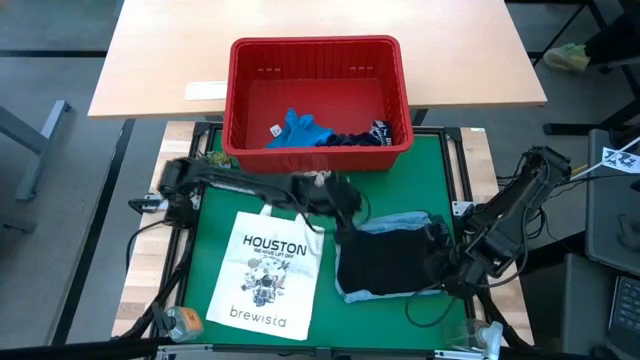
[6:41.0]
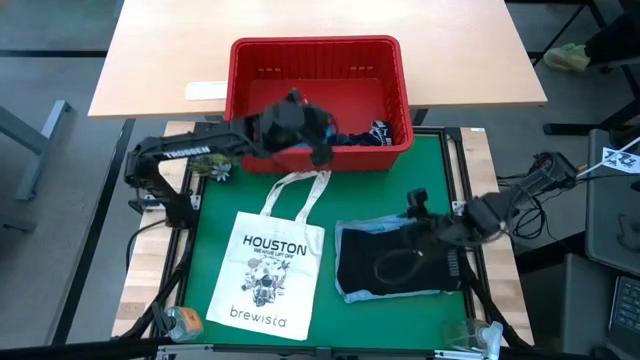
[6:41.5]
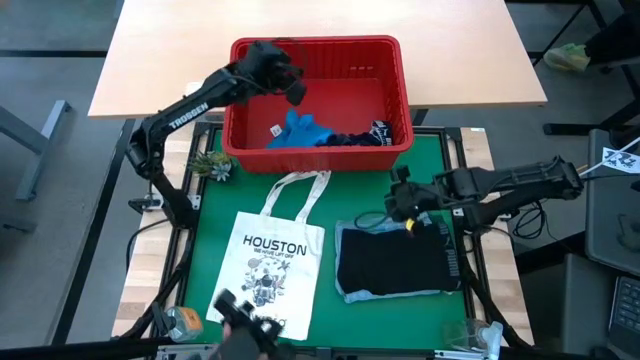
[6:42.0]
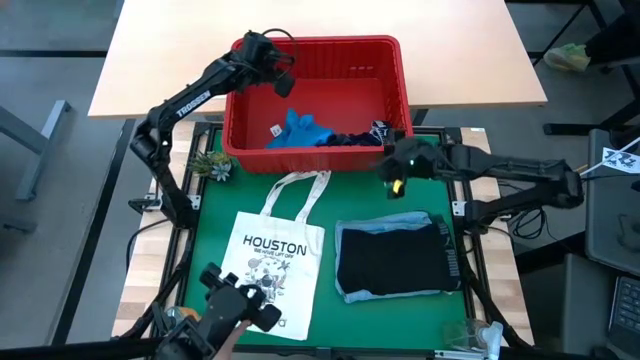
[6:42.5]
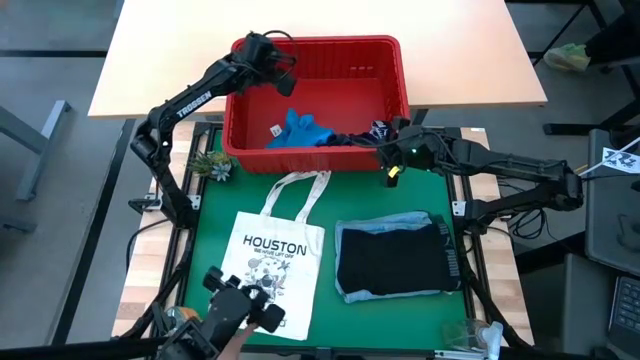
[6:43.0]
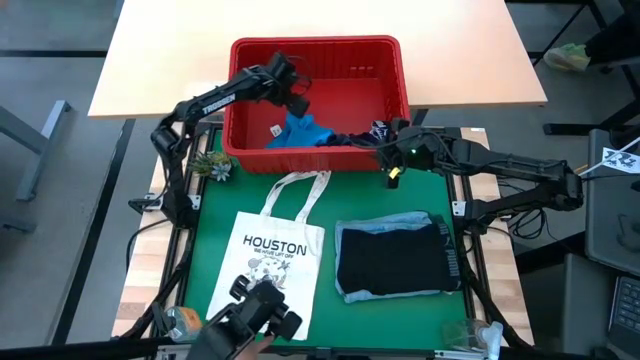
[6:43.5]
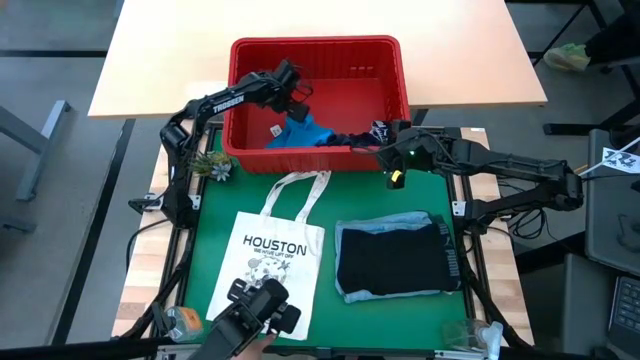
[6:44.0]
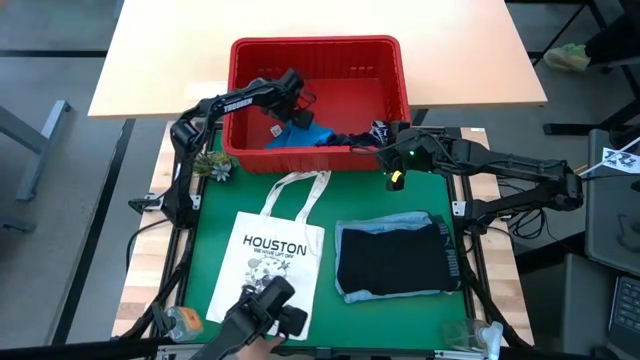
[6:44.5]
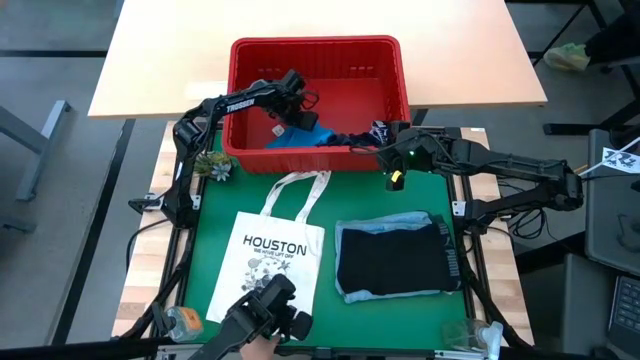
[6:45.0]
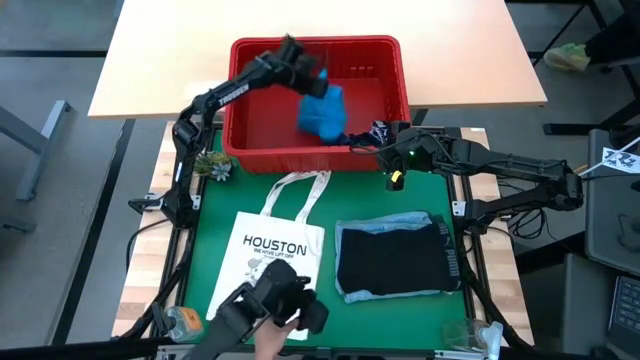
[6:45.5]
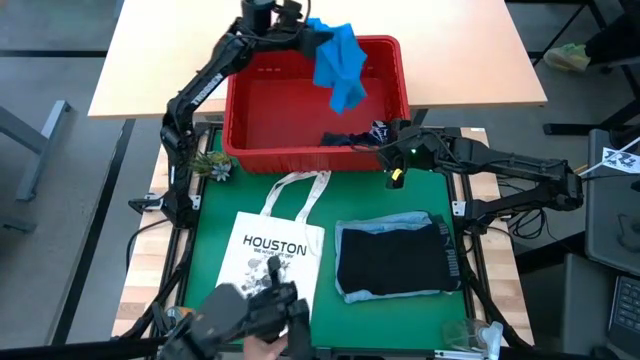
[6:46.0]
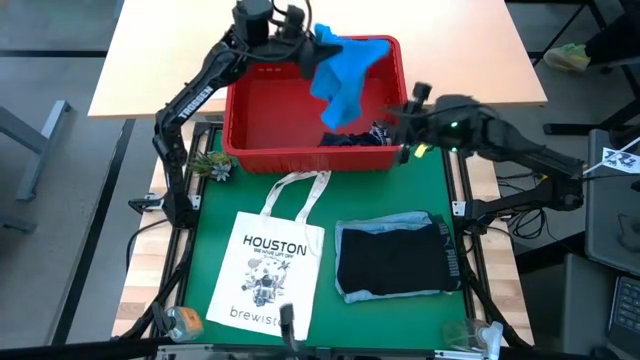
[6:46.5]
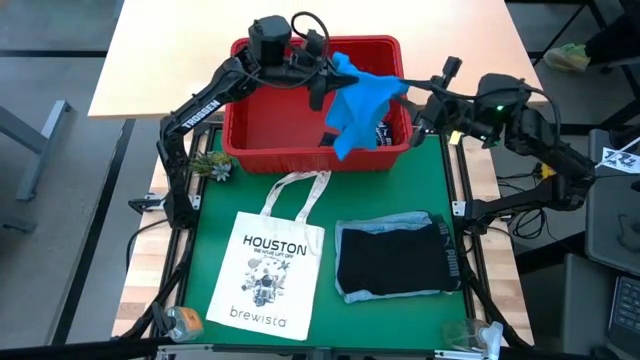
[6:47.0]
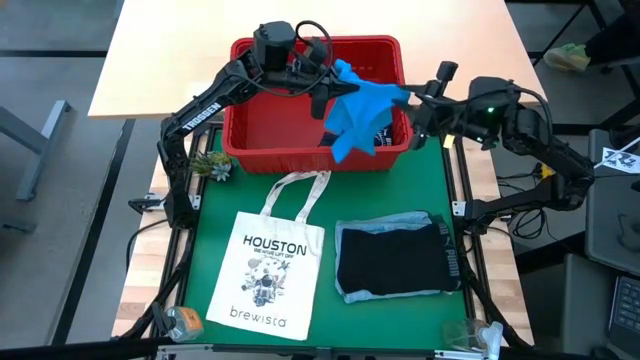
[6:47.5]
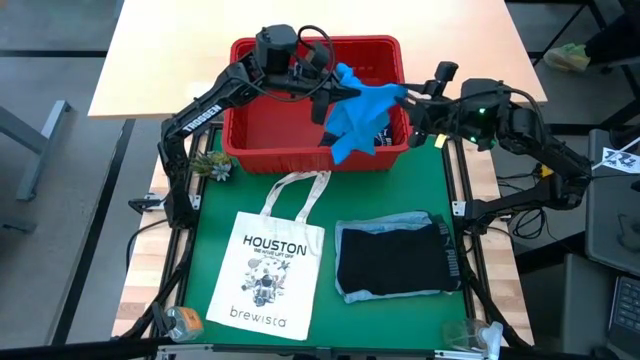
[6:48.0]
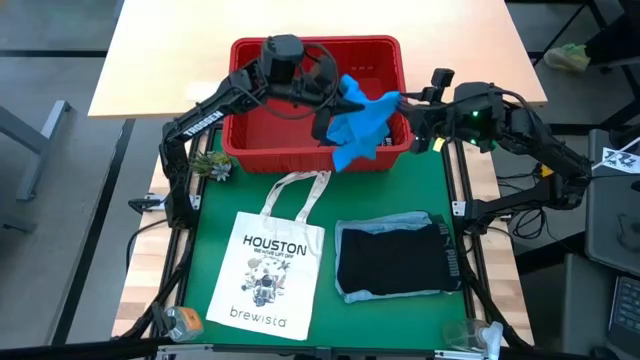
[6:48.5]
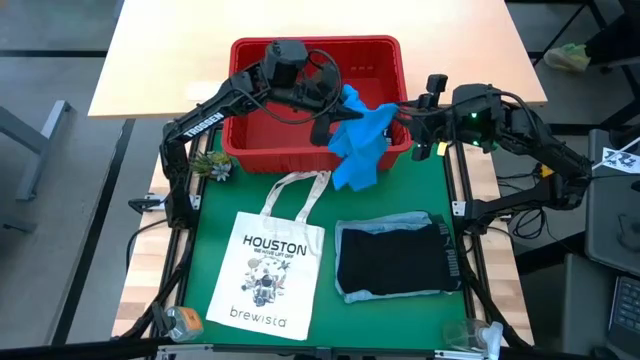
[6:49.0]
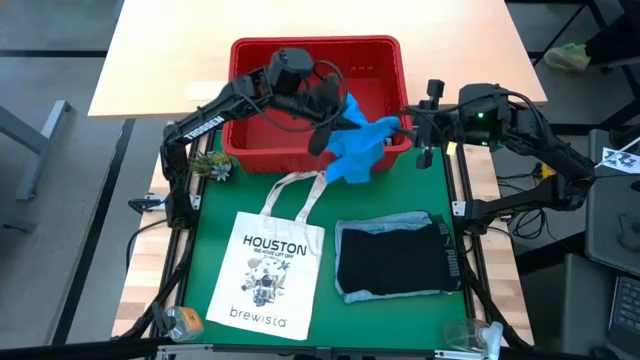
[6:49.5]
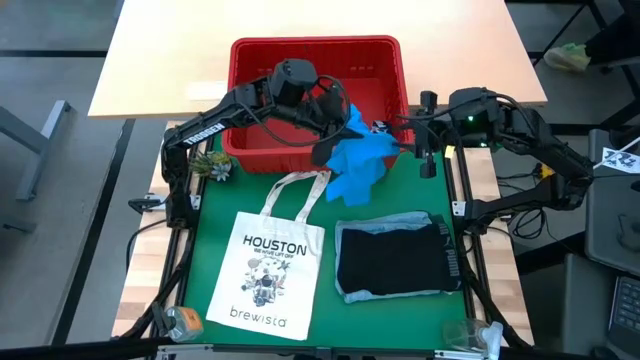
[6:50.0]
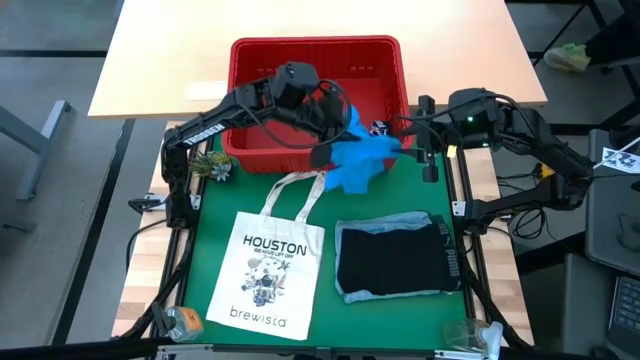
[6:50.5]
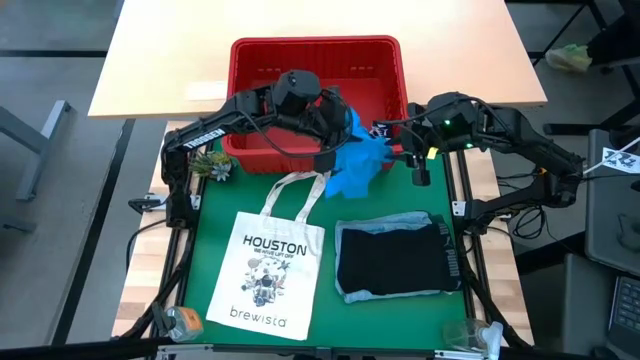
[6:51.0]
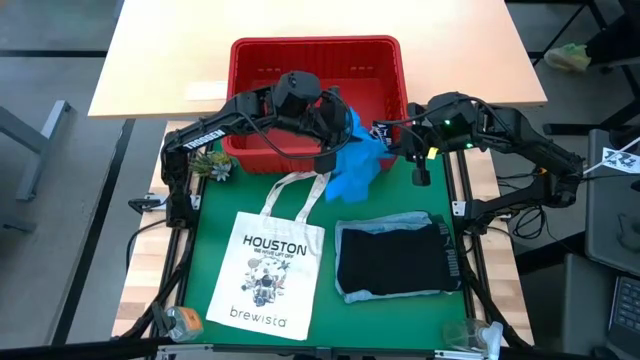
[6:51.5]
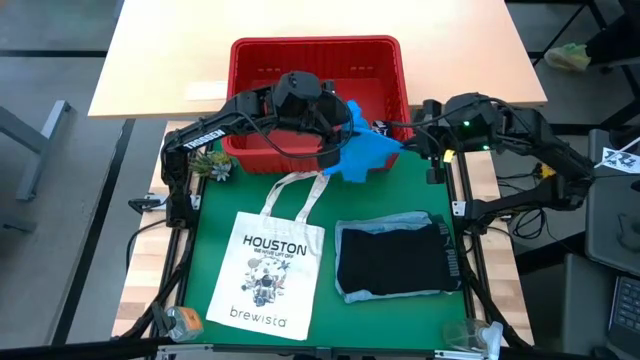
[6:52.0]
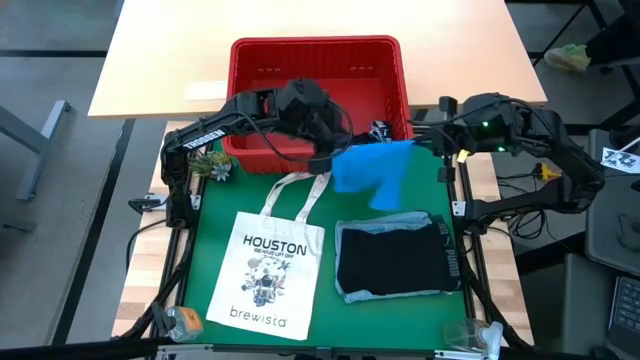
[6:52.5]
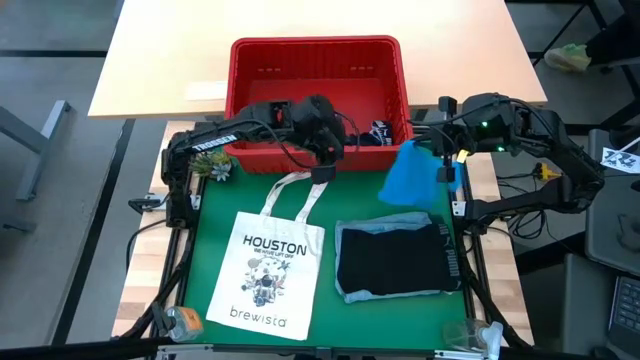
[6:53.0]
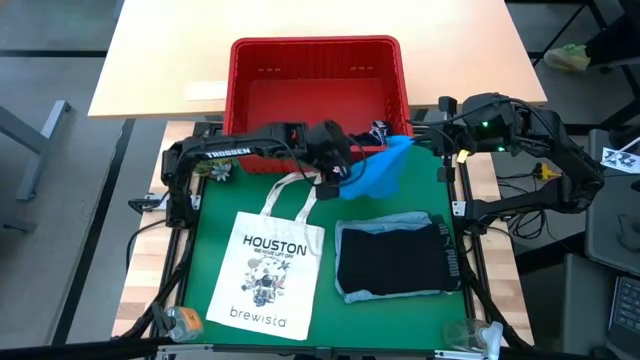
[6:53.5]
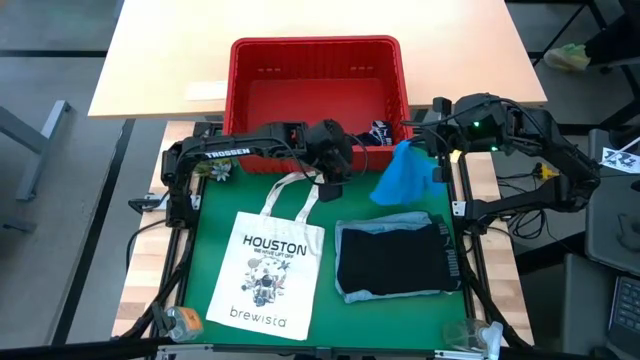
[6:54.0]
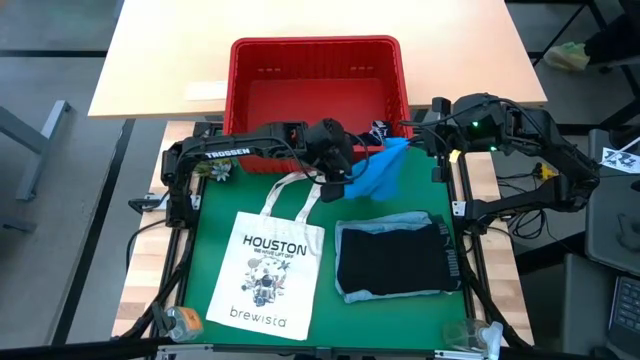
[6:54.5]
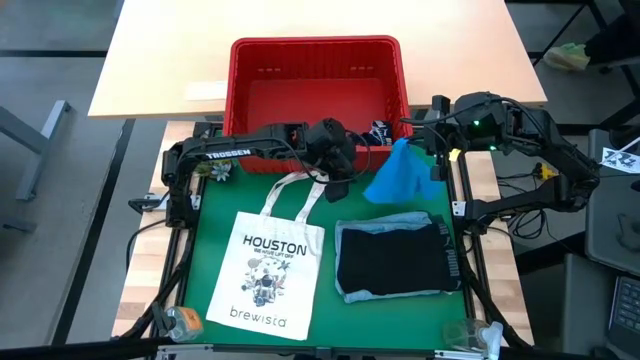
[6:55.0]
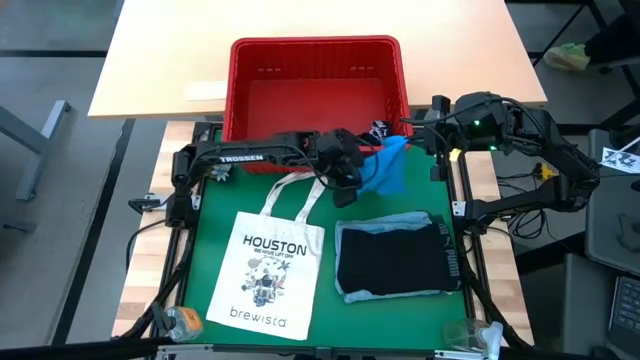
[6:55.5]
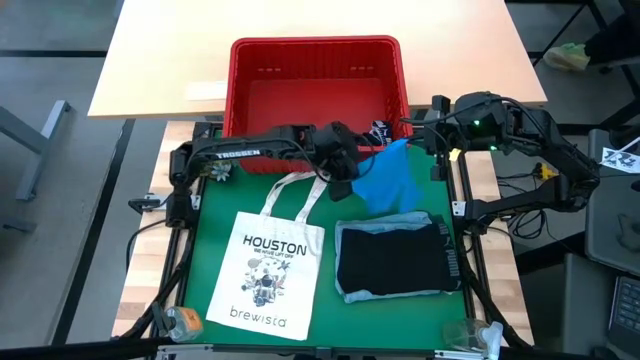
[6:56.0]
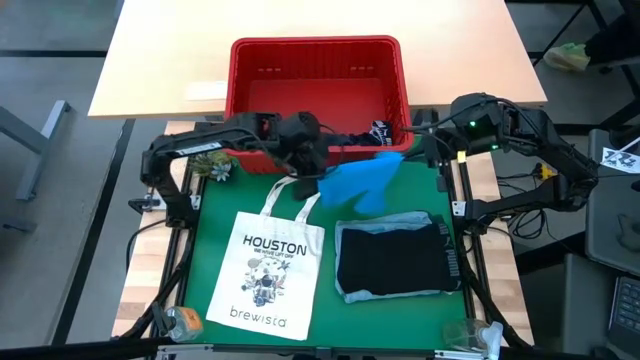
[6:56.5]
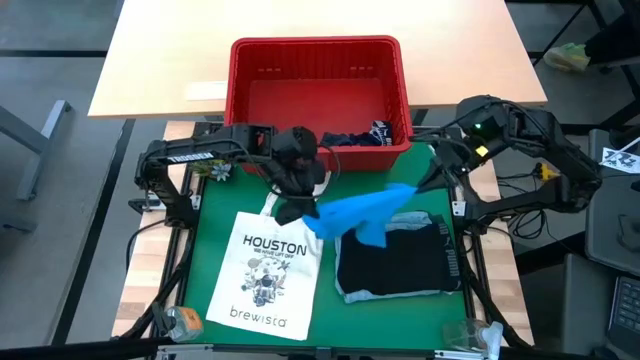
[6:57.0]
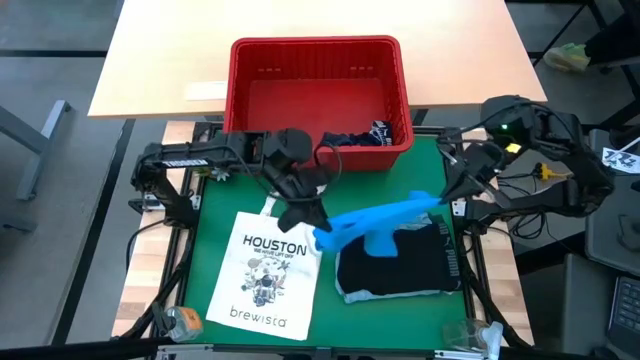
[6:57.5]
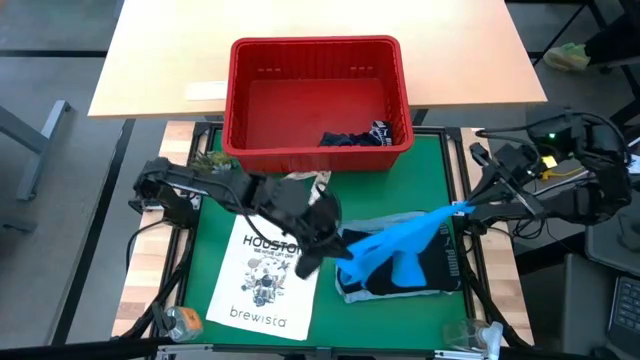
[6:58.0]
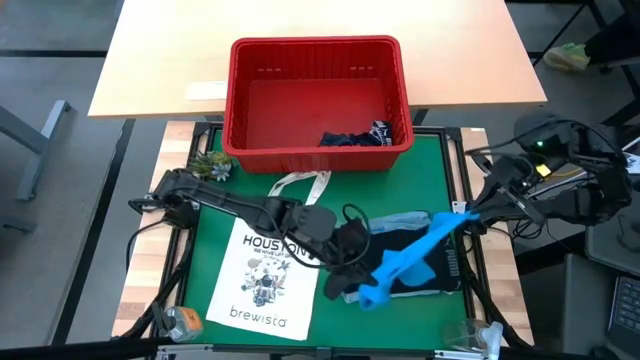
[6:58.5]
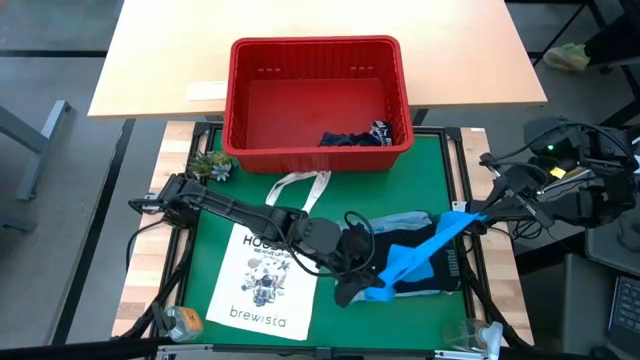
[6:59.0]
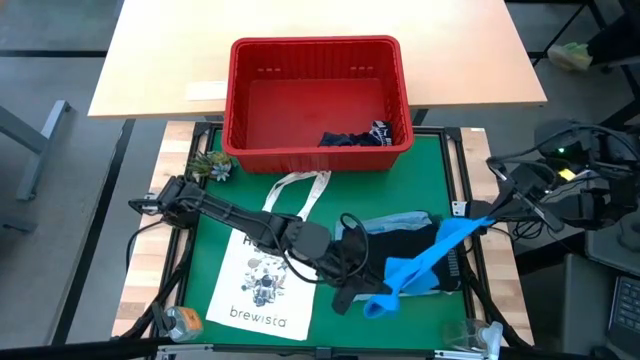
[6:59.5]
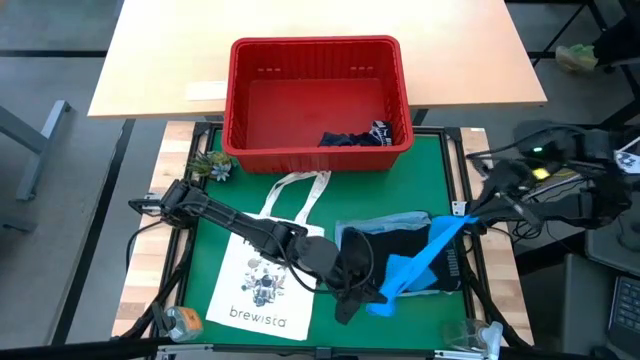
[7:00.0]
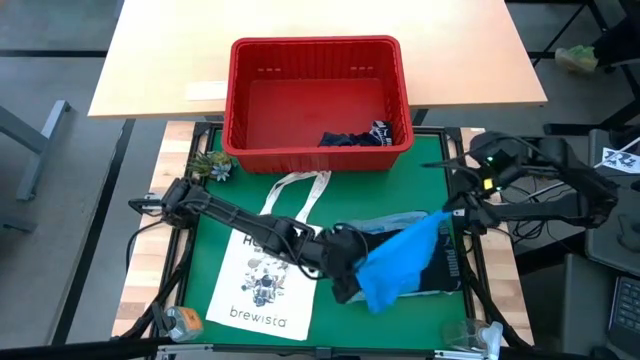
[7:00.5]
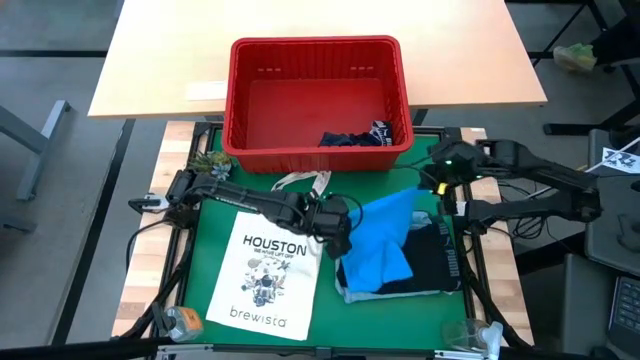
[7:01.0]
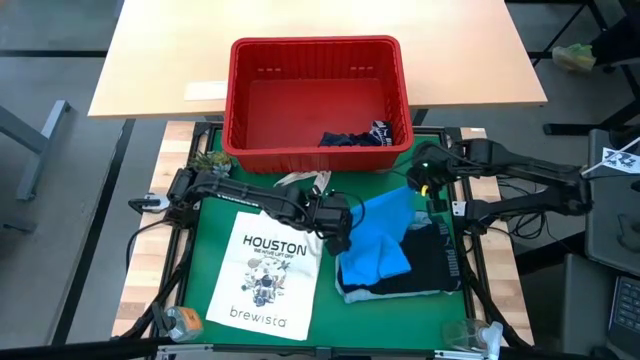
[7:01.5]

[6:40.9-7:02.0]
Task: Fold Laundry from Bin
Fold the blue short
